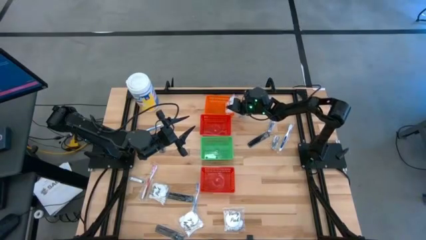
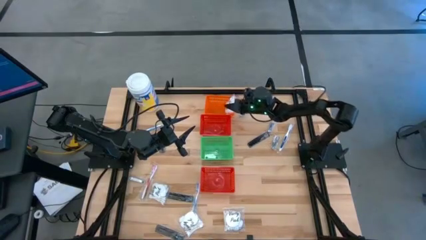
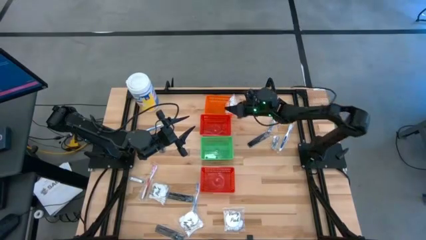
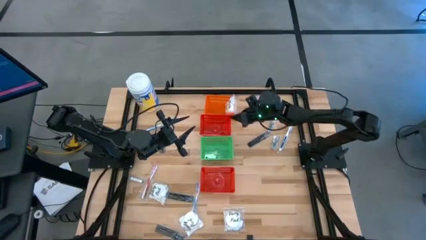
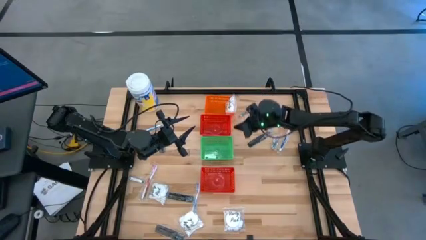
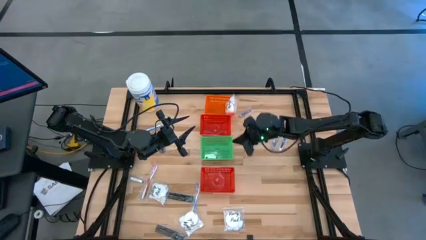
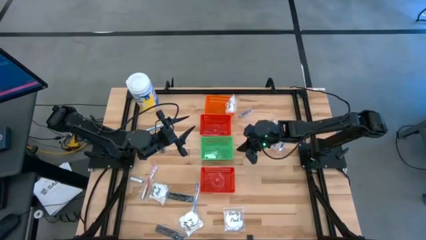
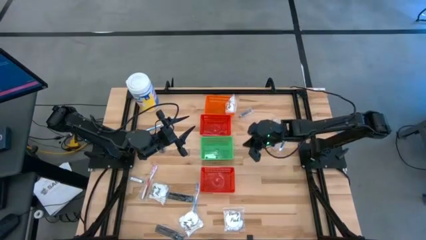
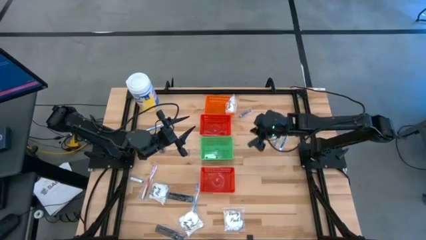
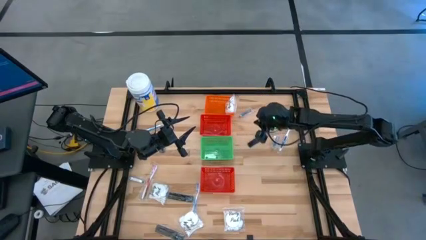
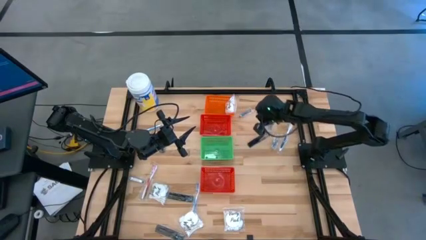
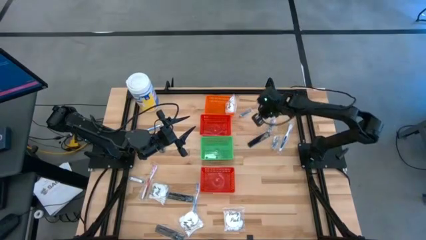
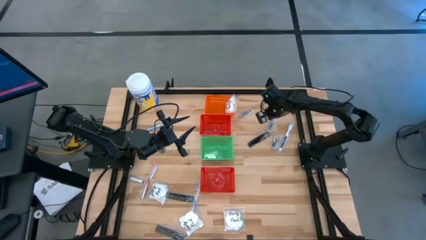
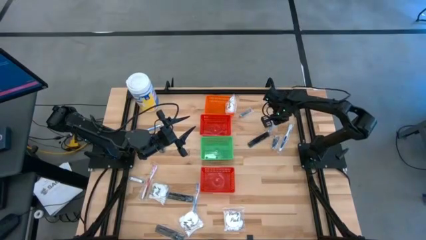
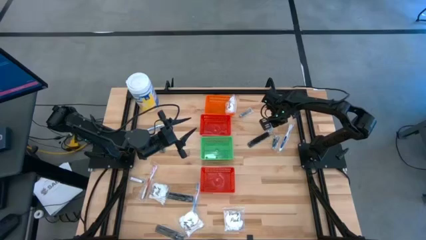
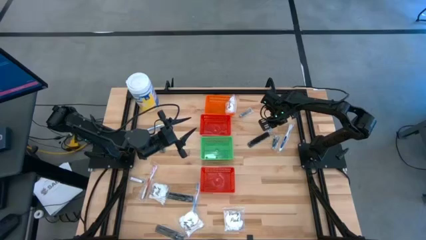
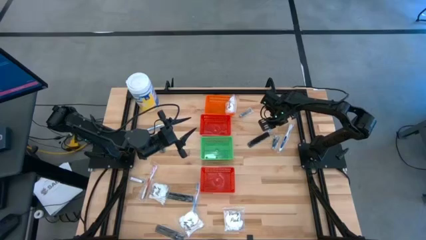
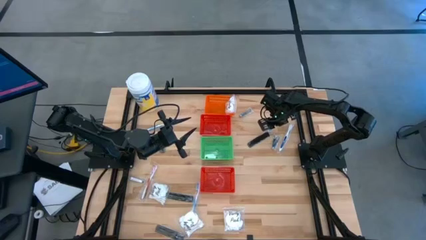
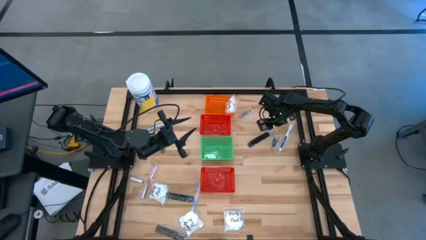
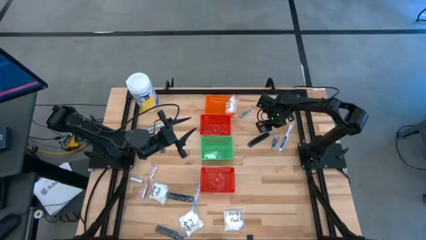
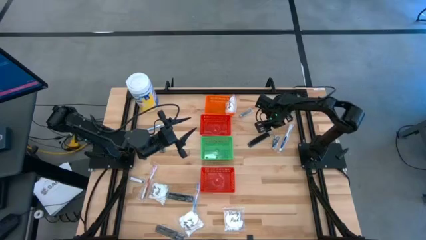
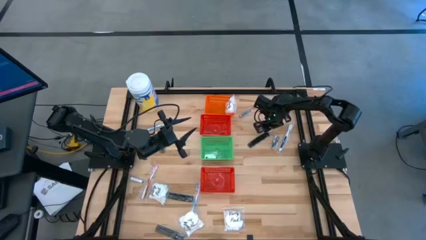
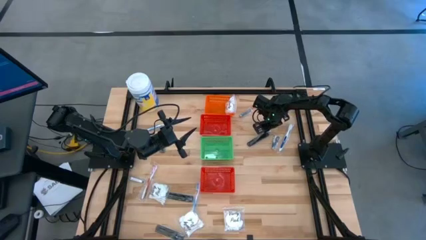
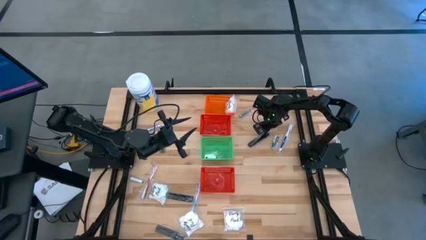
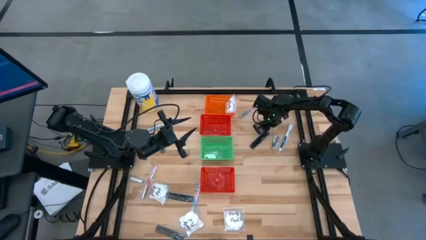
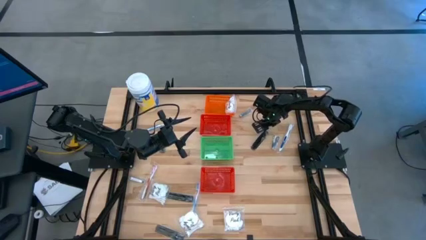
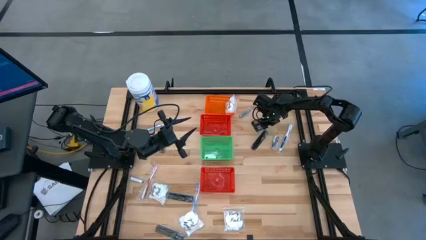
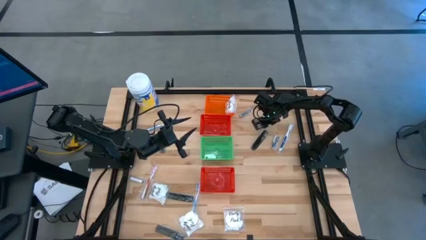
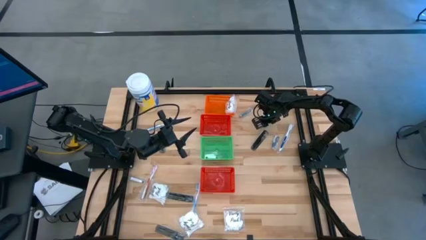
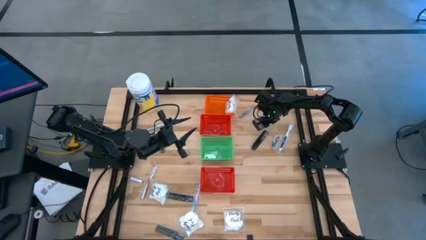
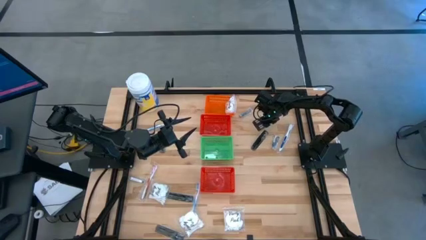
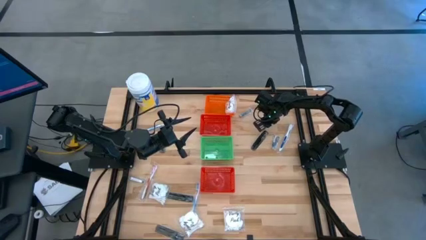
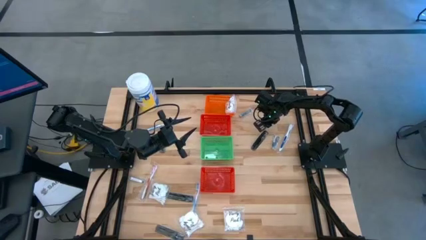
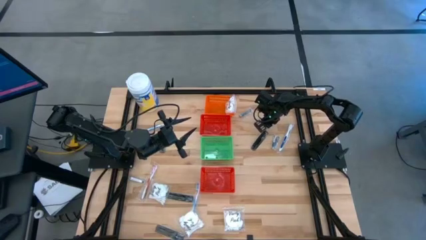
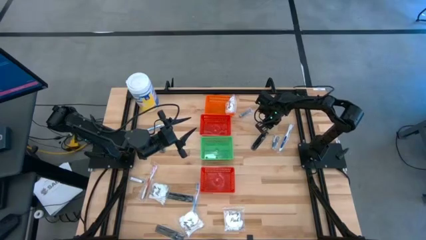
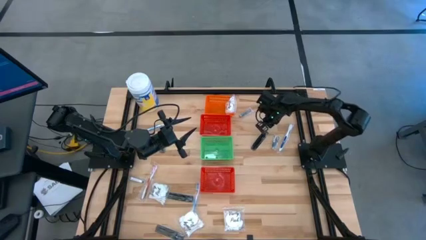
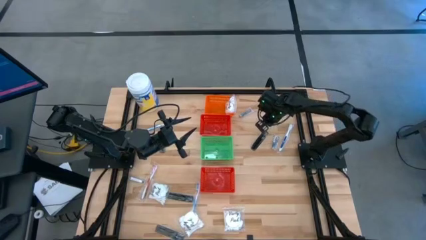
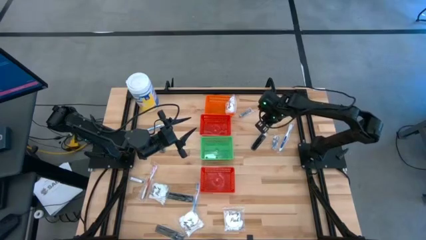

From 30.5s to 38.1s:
Task: Pick & Place Travel size toiletries
Put the silver nail clipper into the bottom red basket

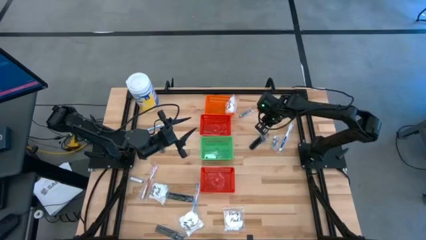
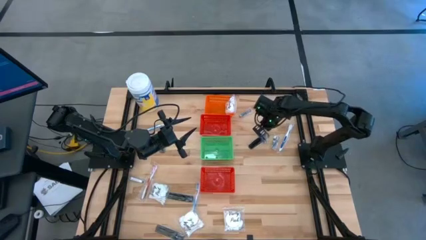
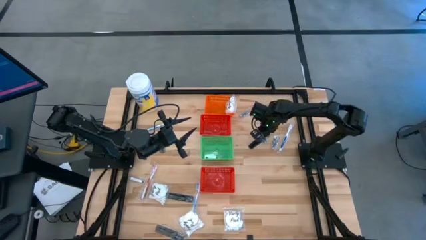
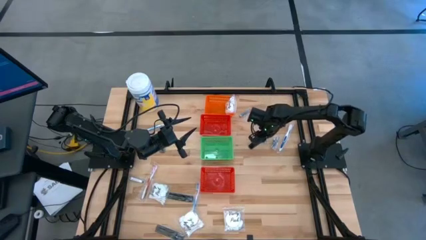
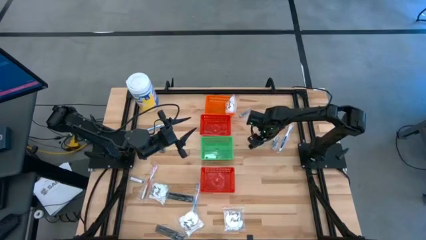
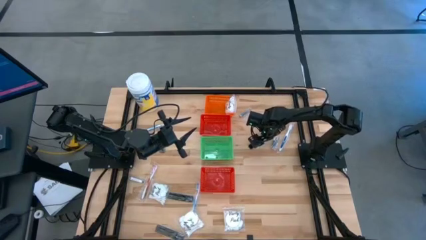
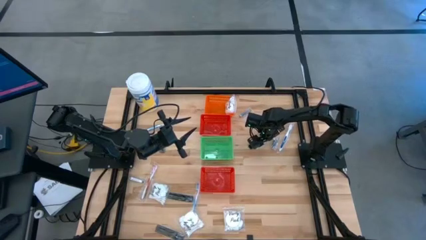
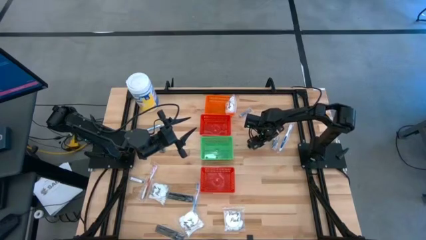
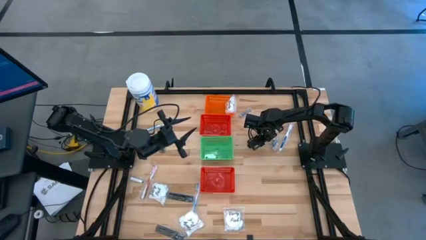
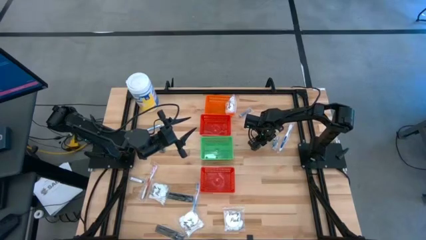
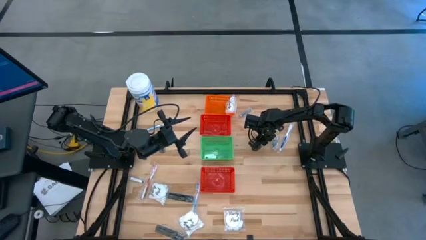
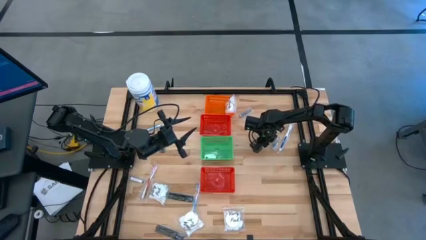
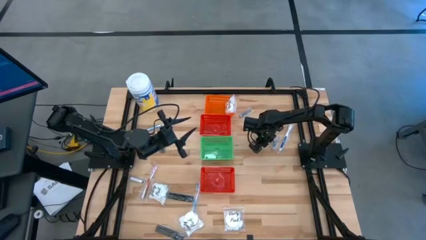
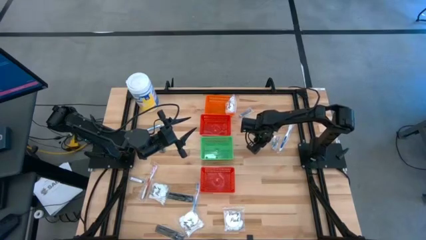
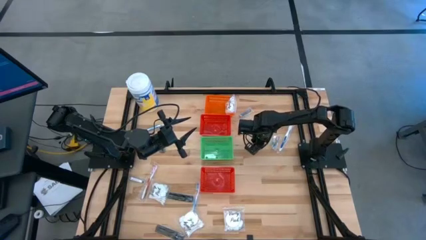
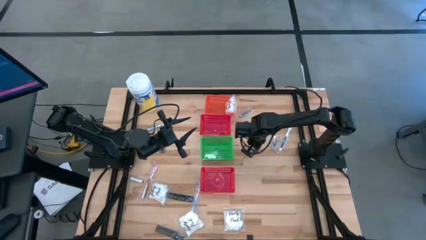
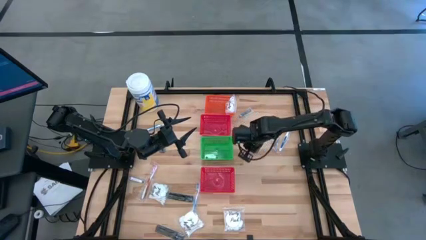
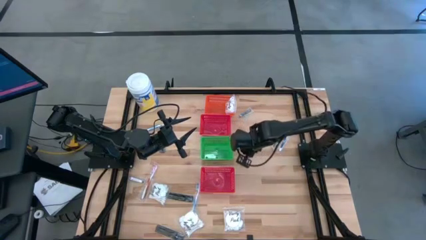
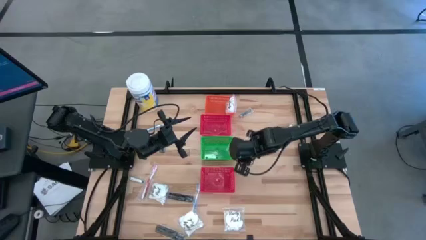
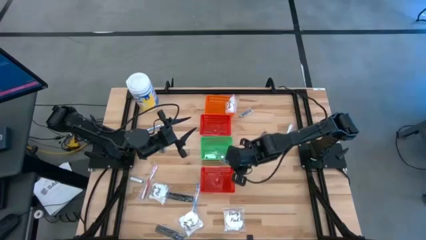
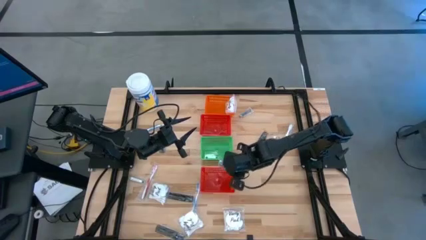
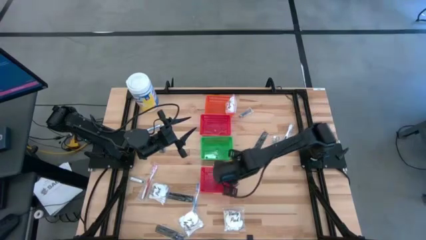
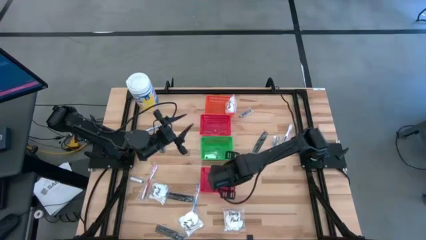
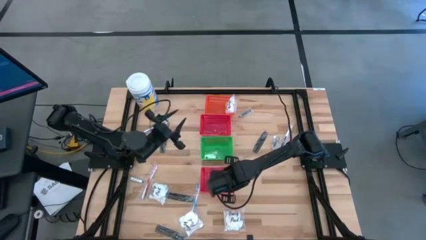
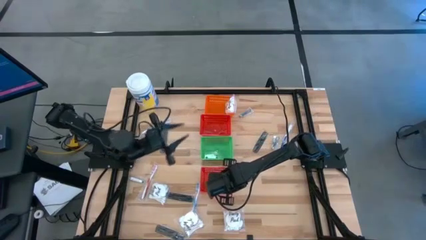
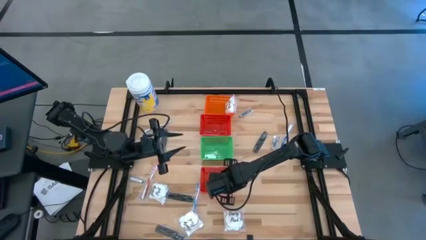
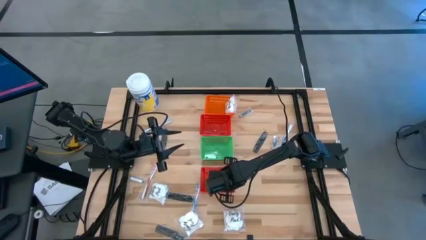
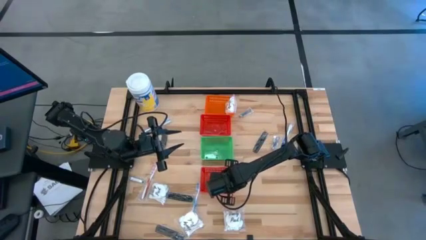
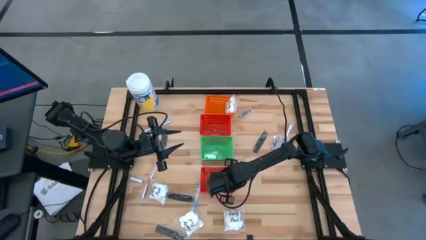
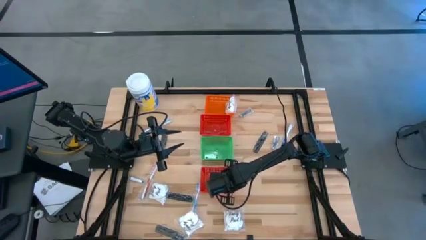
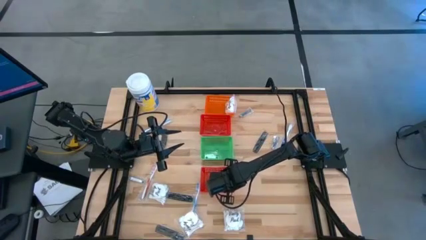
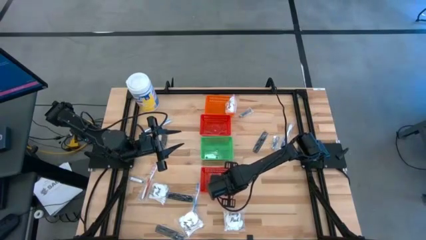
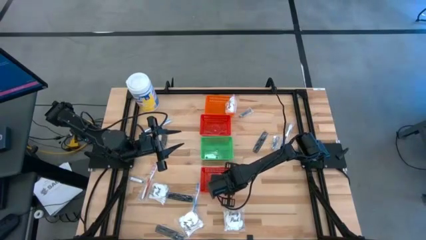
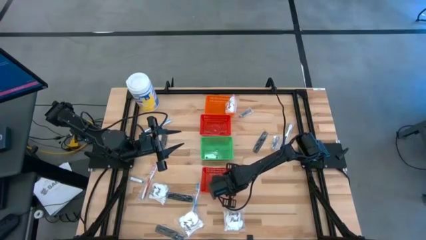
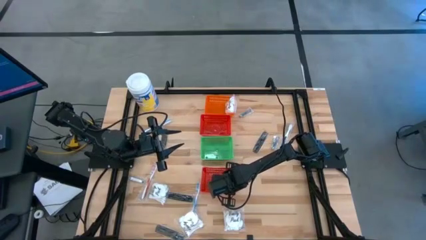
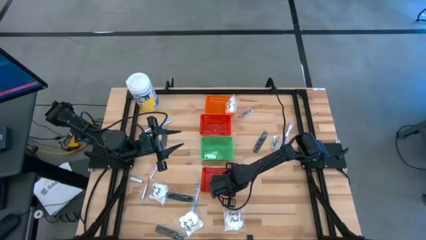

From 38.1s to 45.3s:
Put the silver nail clipper into the bottom red basket
